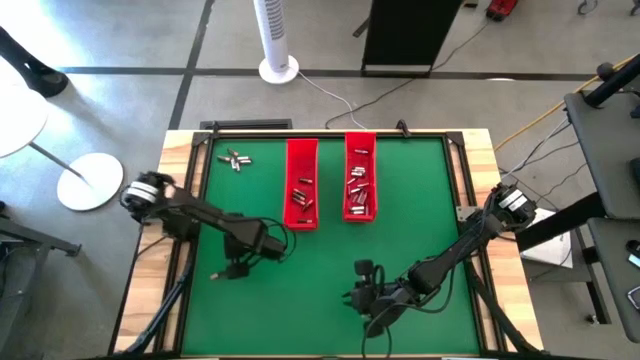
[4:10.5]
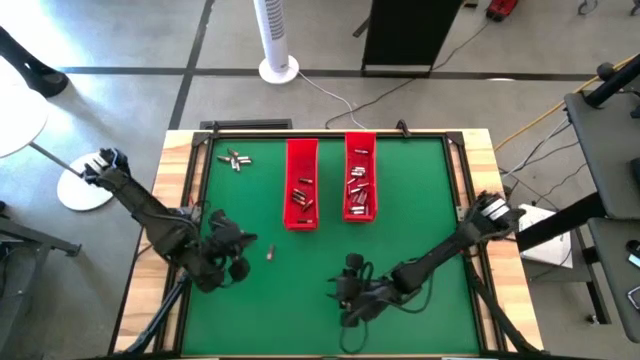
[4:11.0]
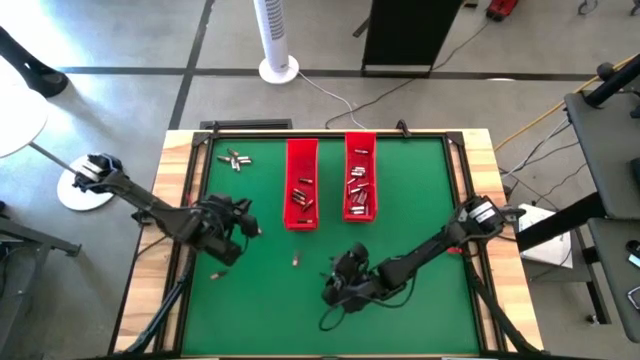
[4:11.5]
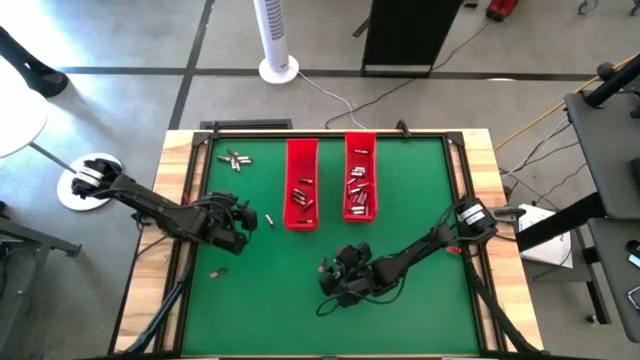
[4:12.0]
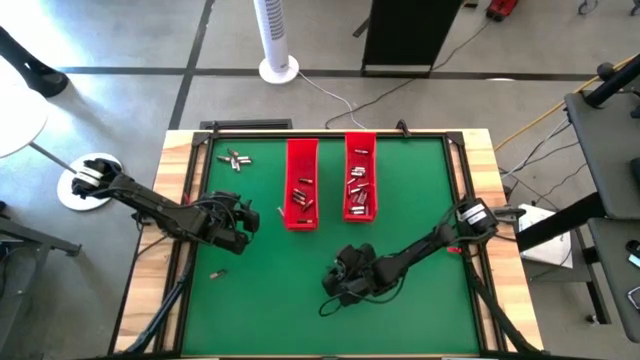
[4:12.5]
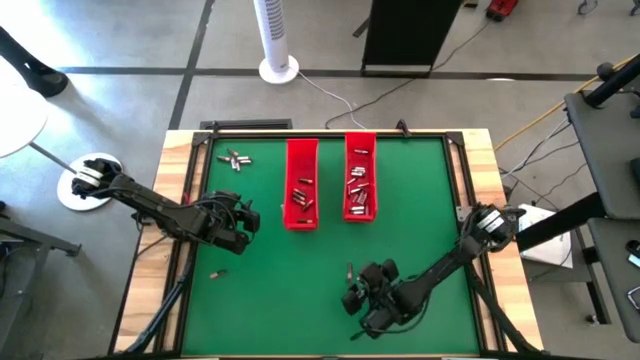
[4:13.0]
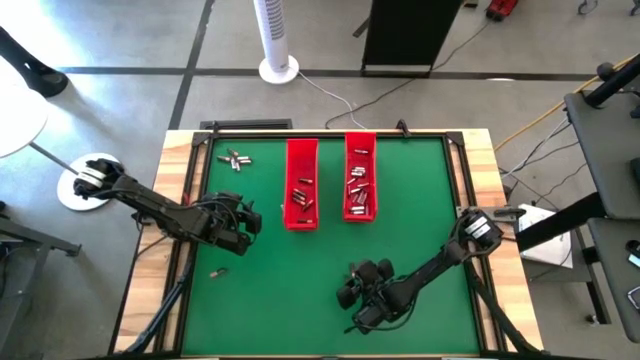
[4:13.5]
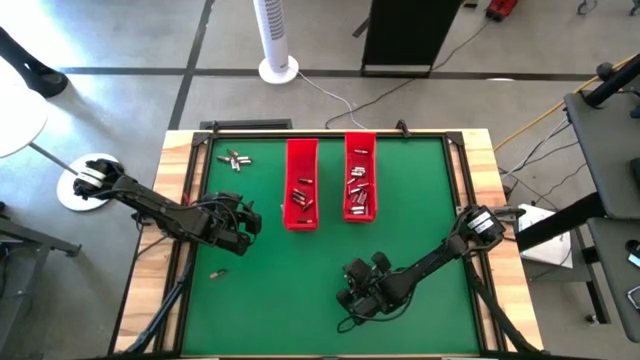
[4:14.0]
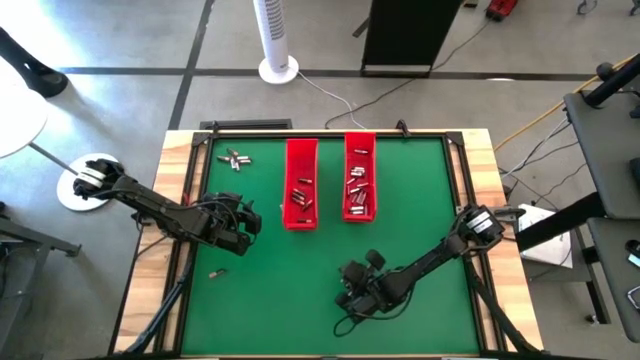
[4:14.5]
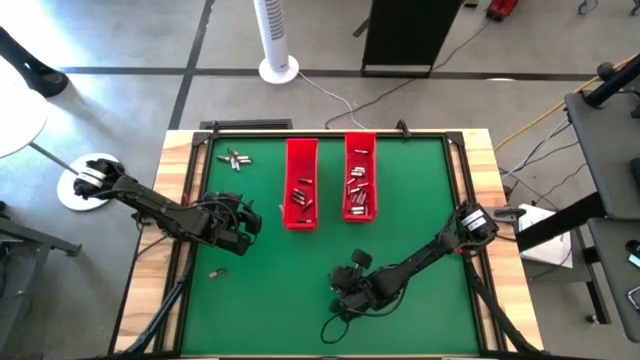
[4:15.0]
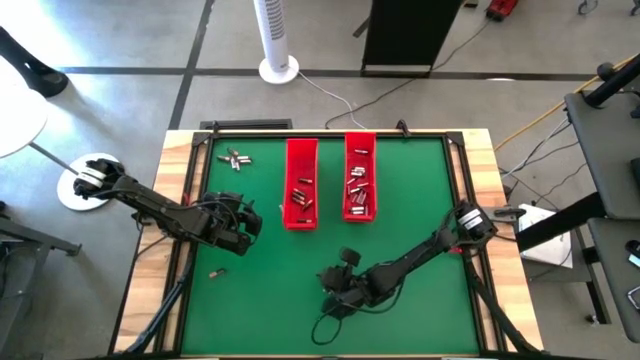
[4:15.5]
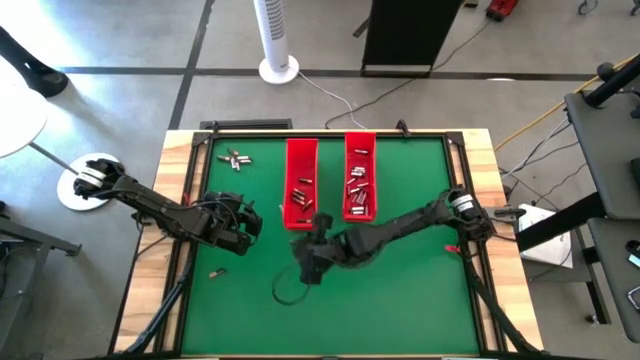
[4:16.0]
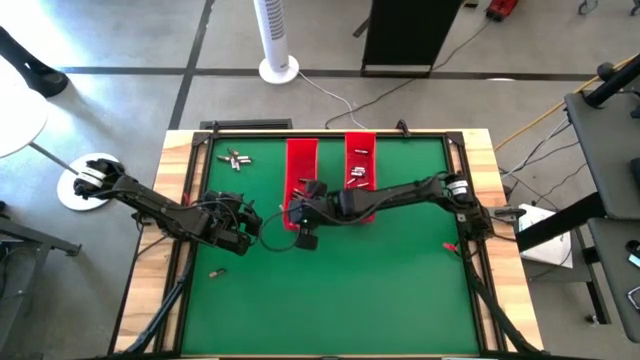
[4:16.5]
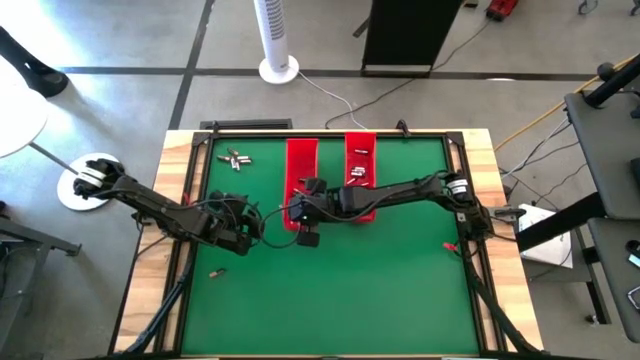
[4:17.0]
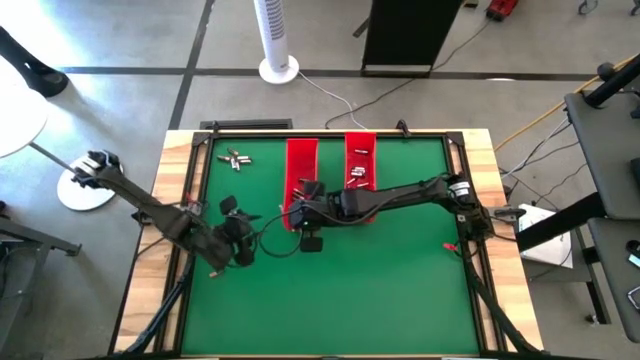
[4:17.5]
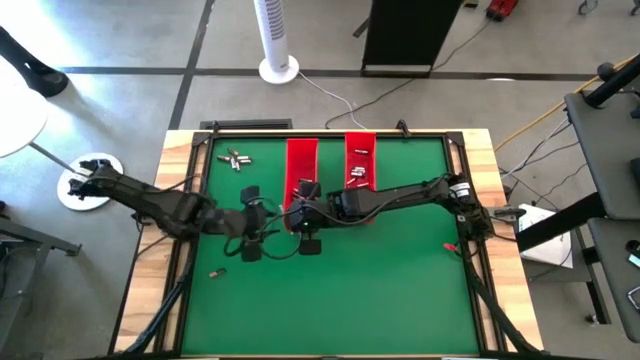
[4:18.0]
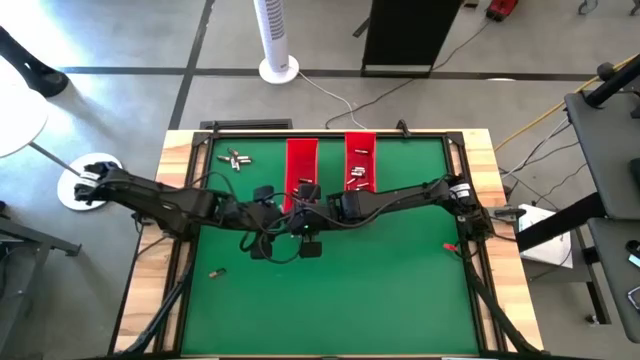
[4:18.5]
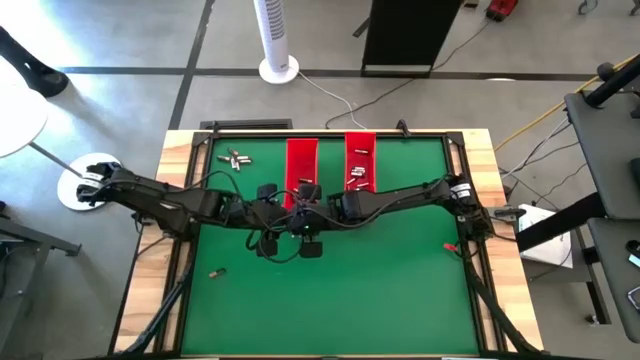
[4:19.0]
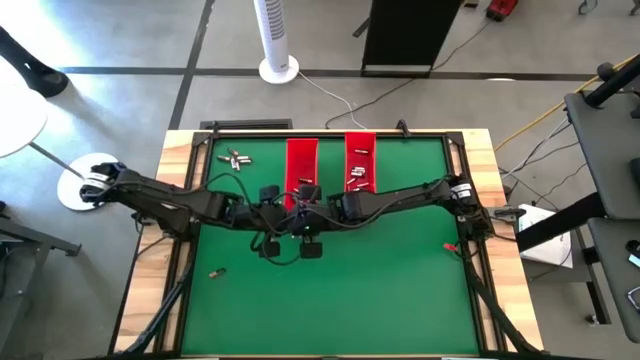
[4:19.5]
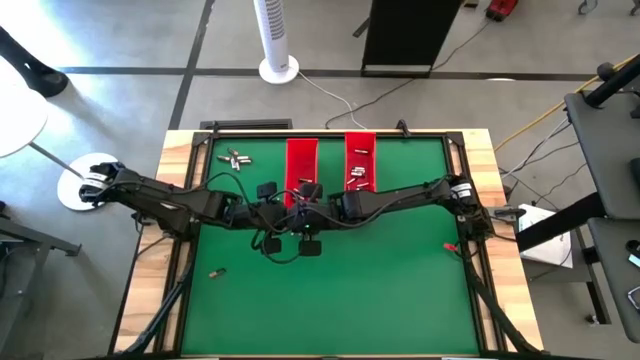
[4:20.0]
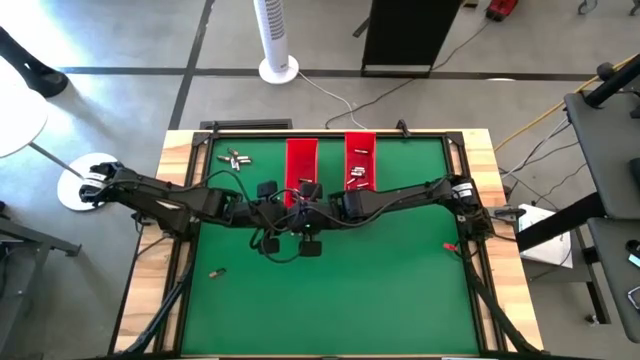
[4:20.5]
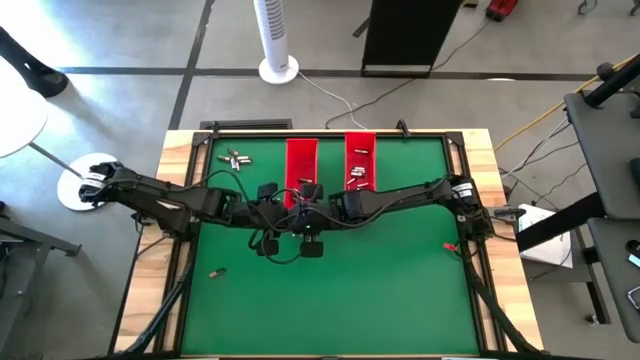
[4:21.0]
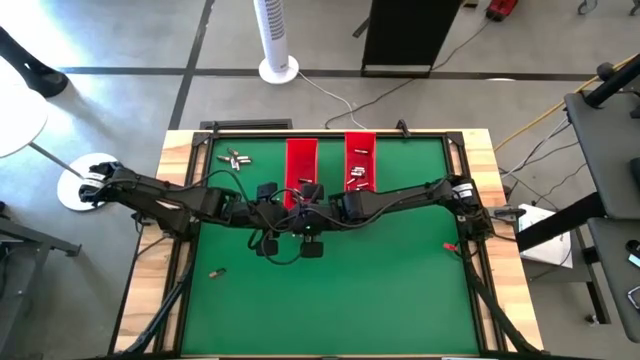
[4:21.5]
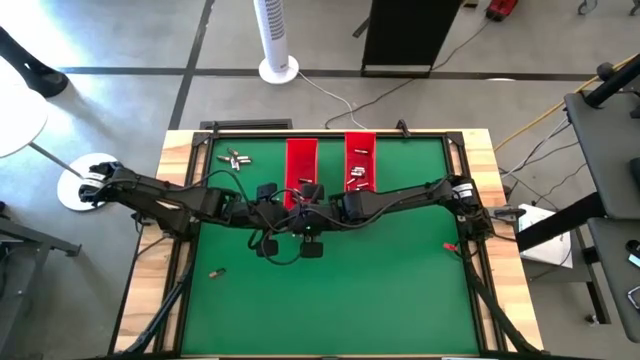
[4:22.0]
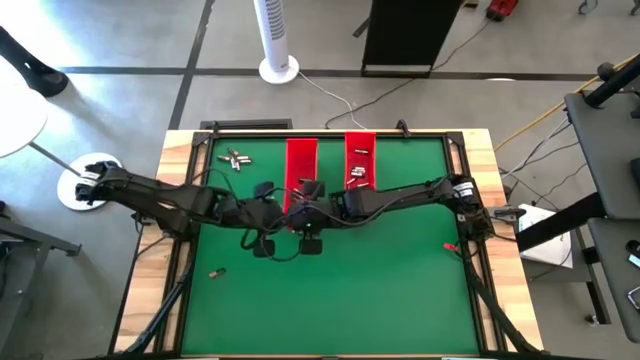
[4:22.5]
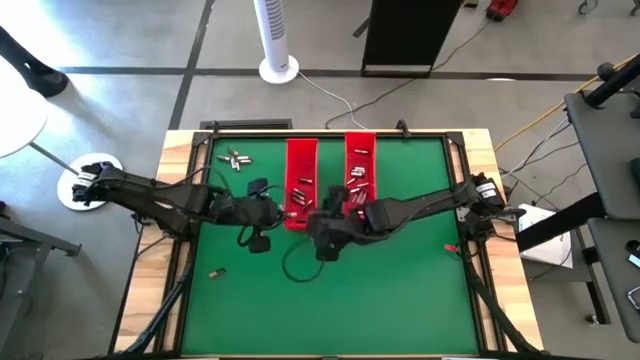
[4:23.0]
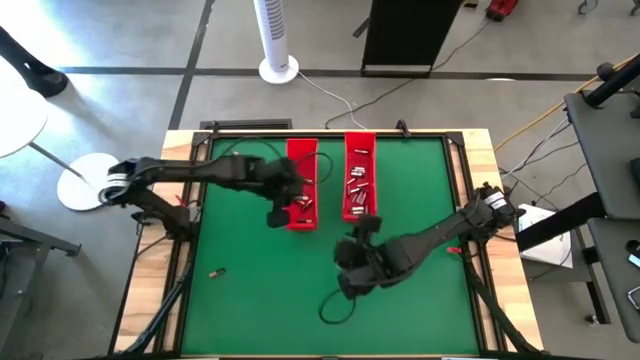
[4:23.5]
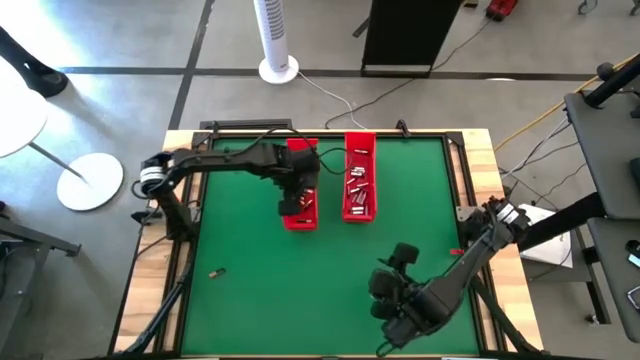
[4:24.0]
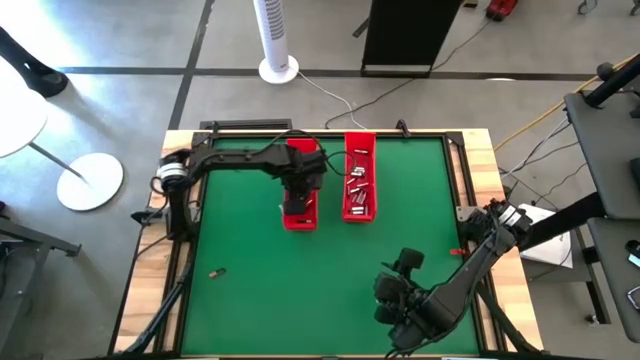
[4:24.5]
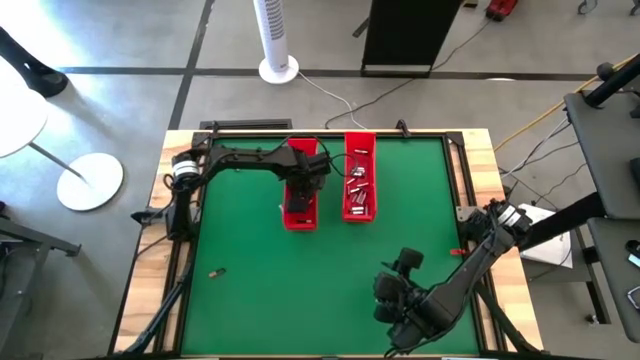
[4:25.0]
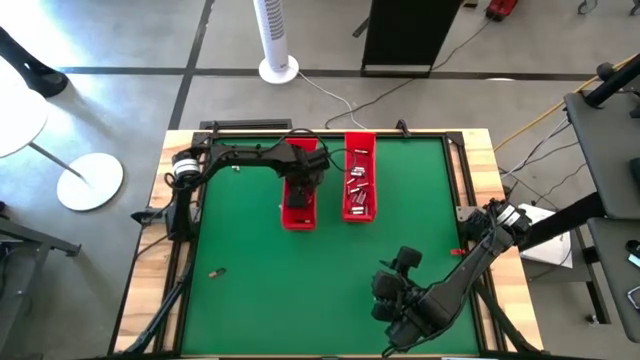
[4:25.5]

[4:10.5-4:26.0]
Task: Sort batteries
Put the black battery into the left red bin

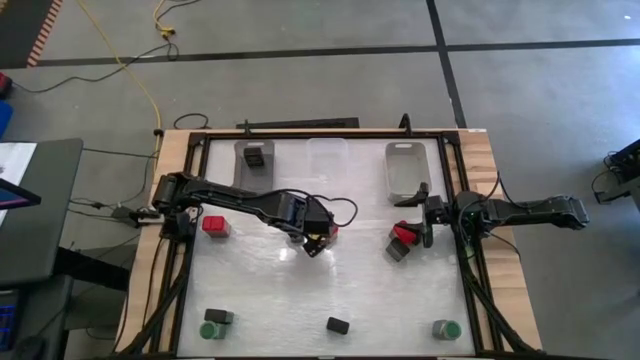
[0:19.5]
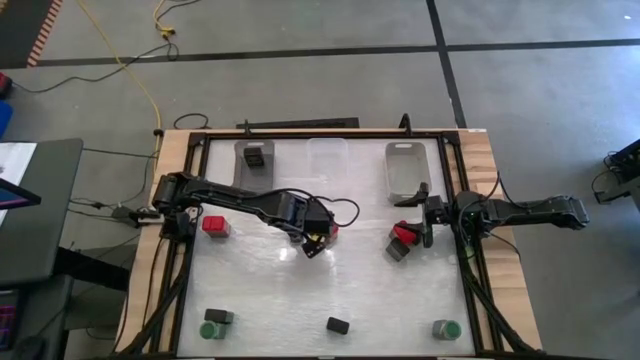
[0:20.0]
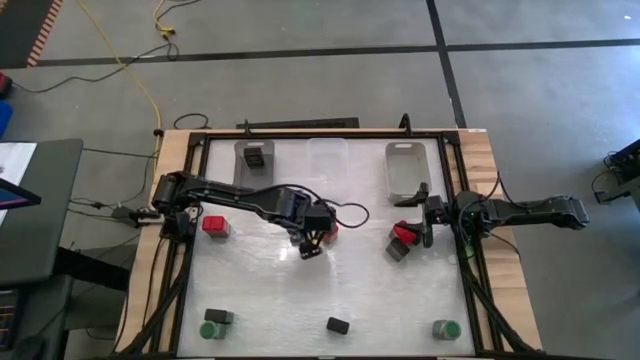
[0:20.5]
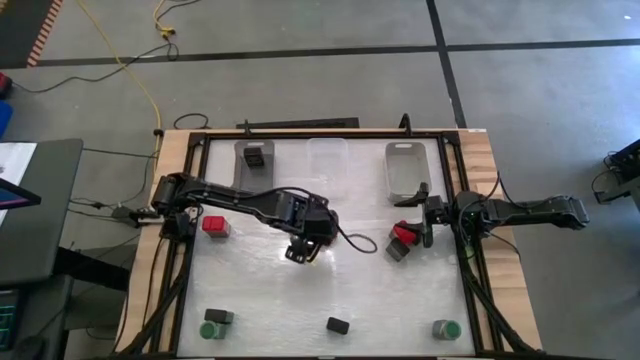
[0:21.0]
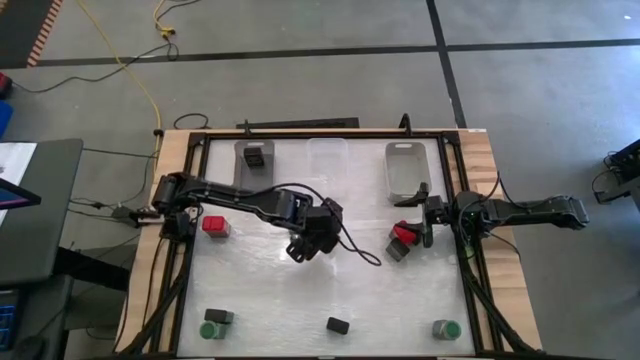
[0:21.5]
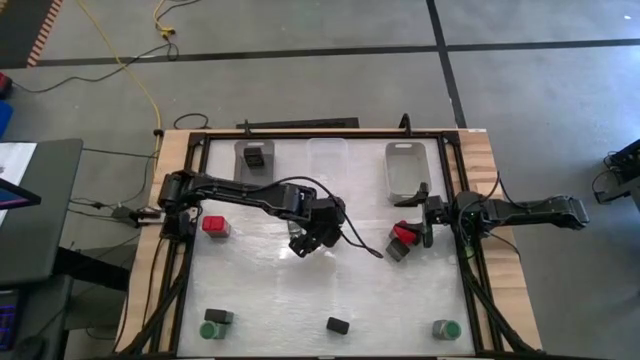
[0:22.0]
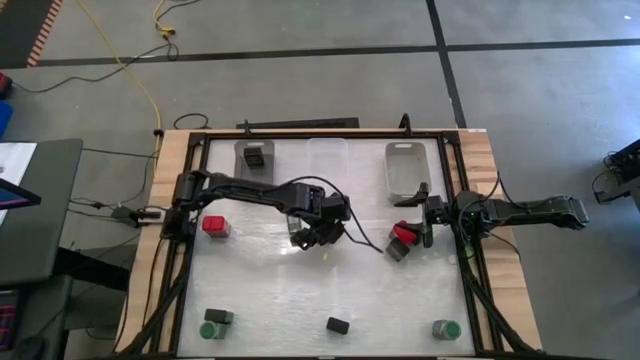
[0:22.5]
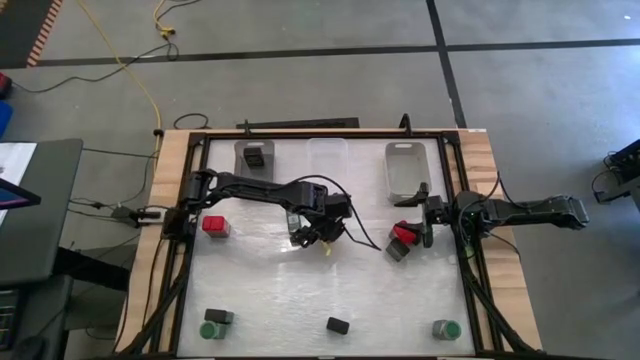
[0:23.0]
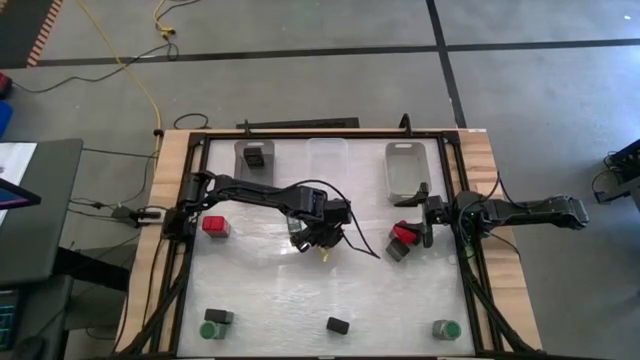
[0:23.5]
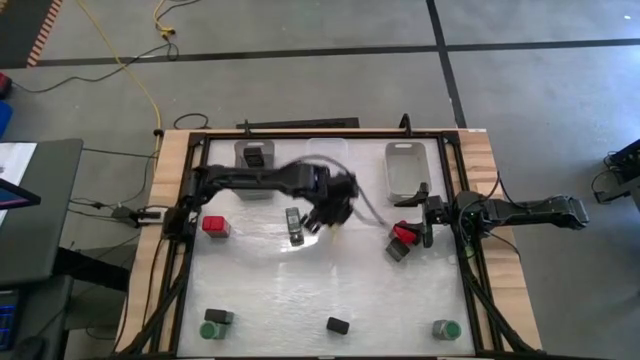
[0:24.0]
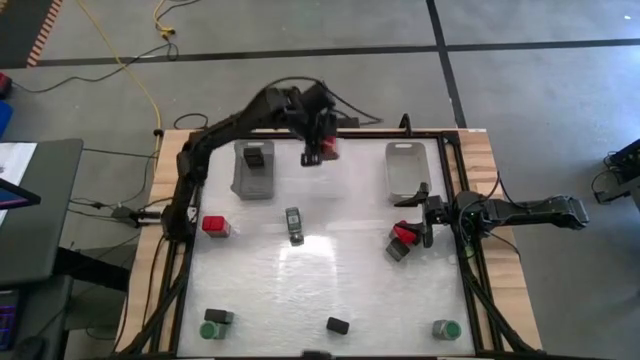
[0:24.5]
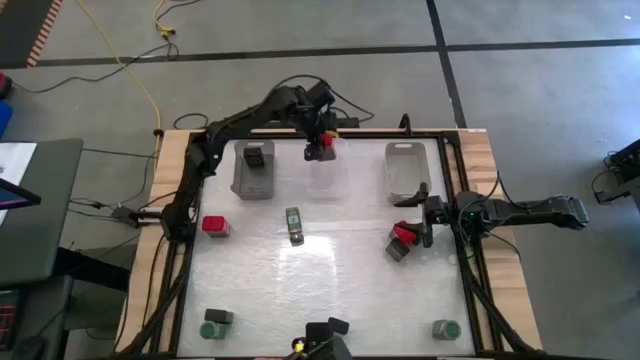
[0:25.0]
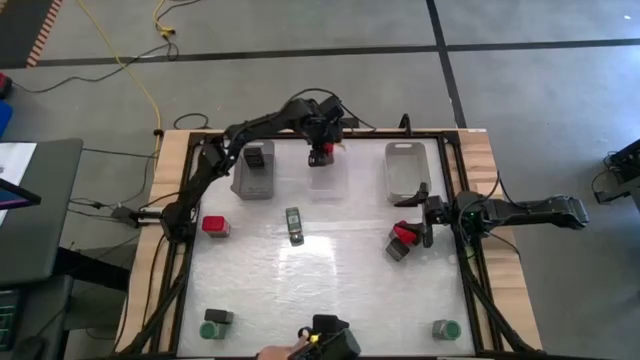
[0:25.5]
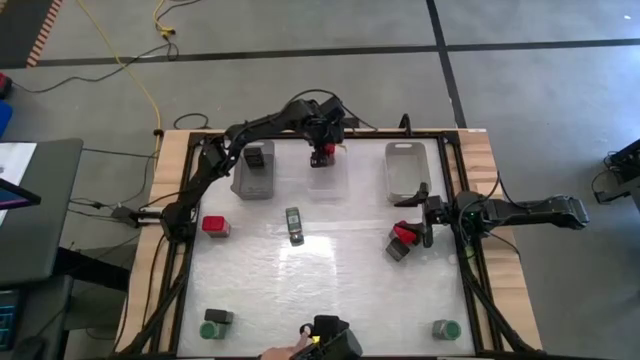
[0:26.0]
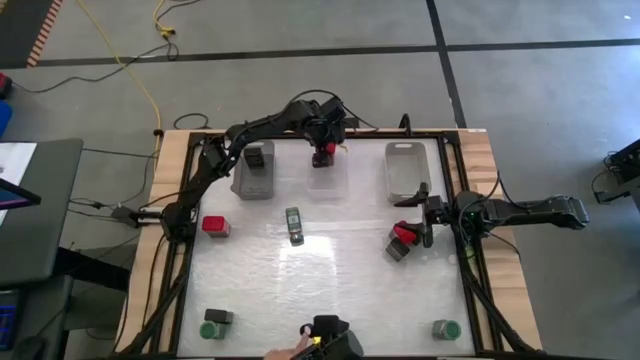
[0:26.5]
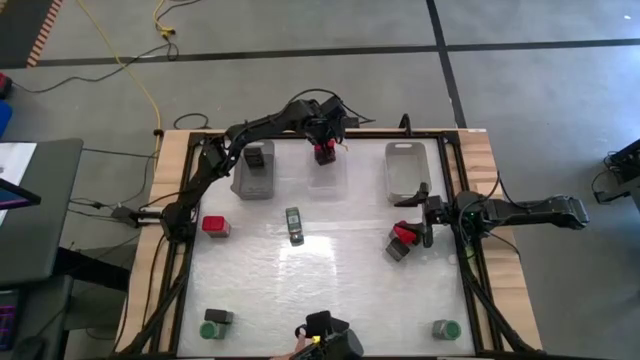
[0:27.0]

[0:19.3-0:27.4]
Task: Sort spices by type
Put the red seasoning can into the transparent bin
